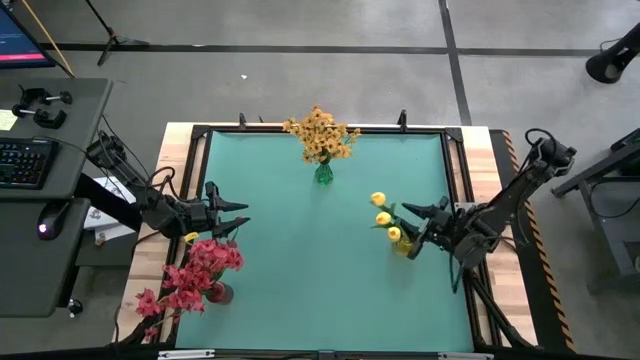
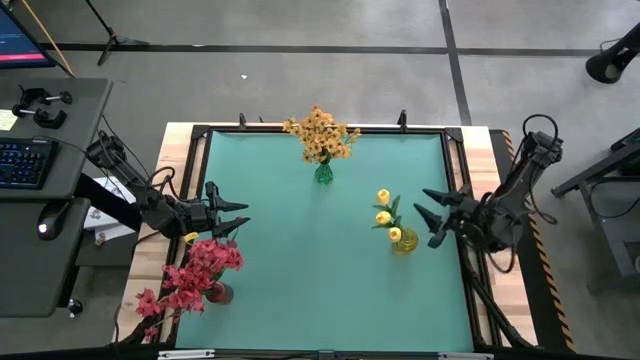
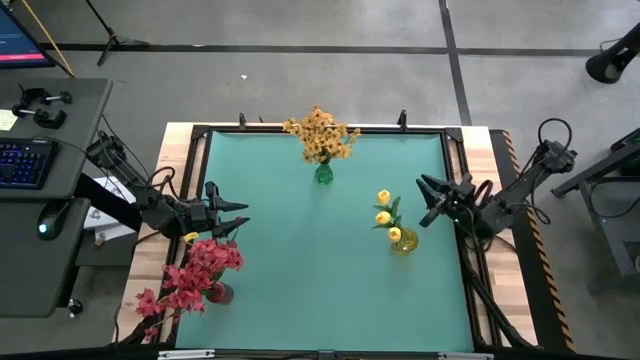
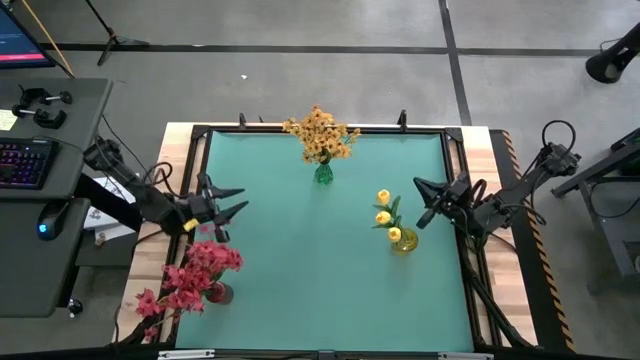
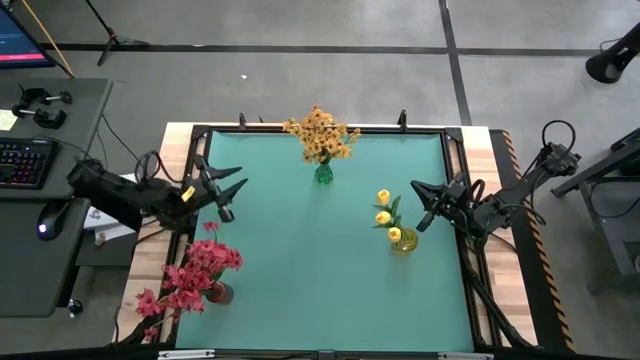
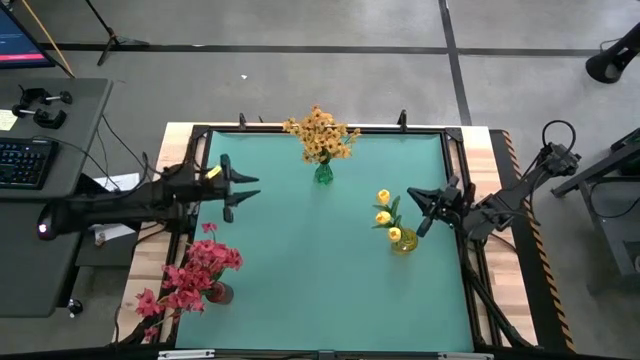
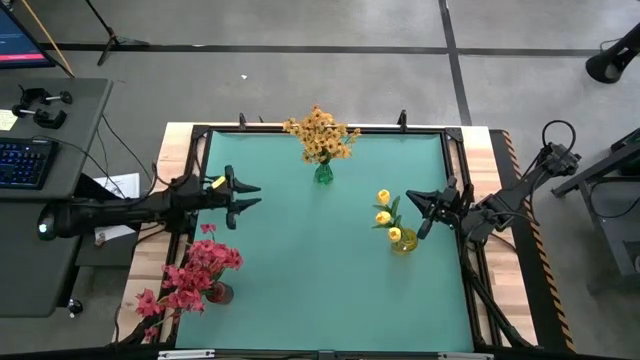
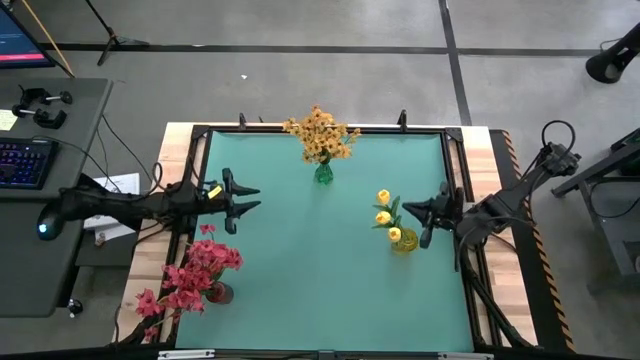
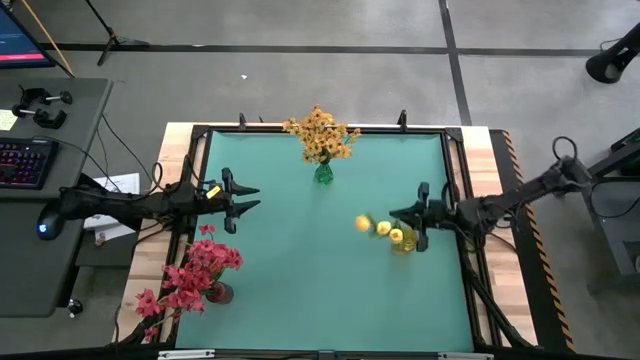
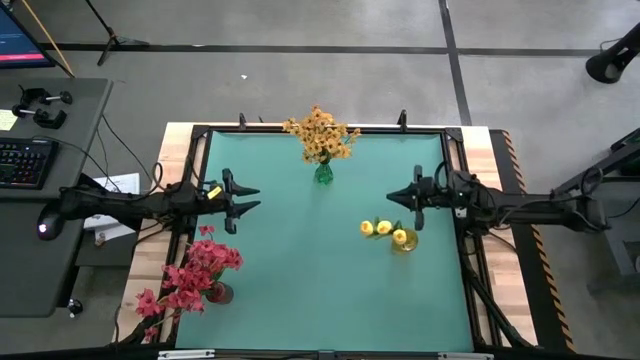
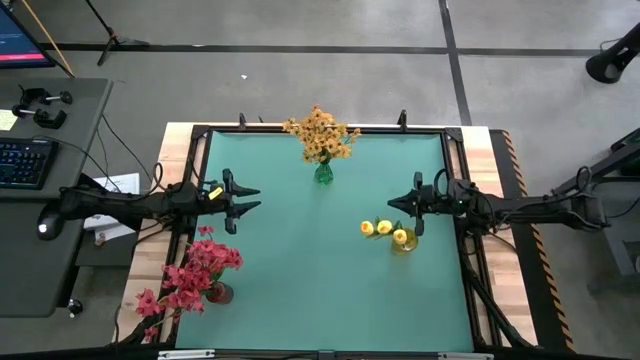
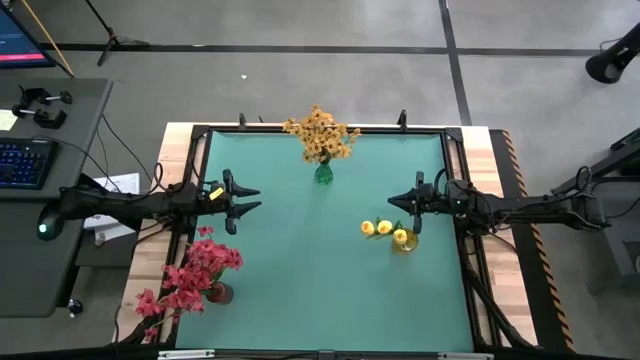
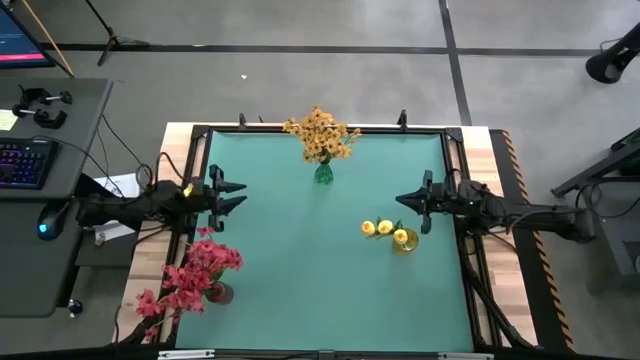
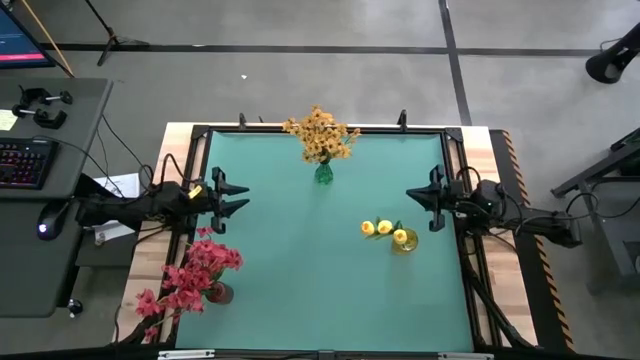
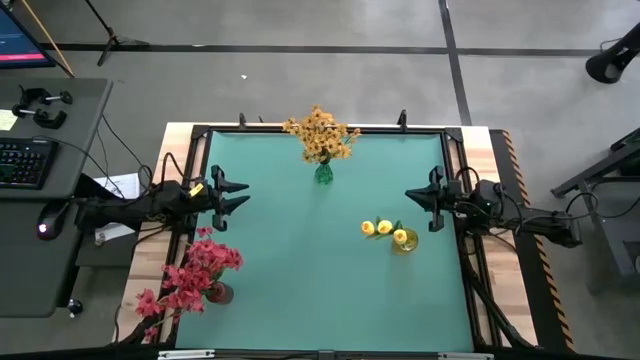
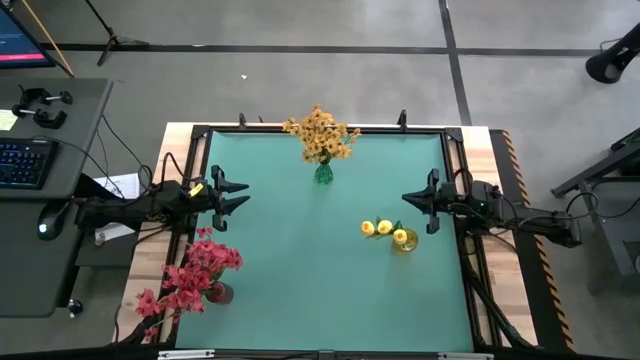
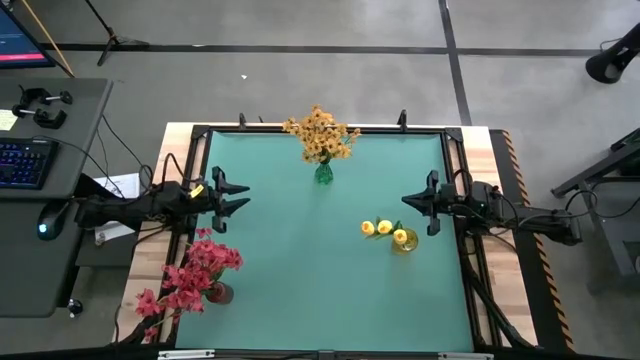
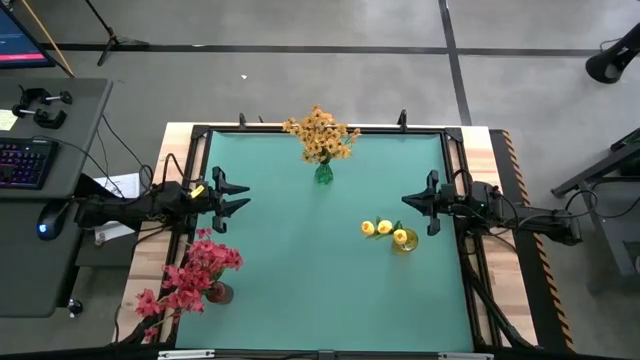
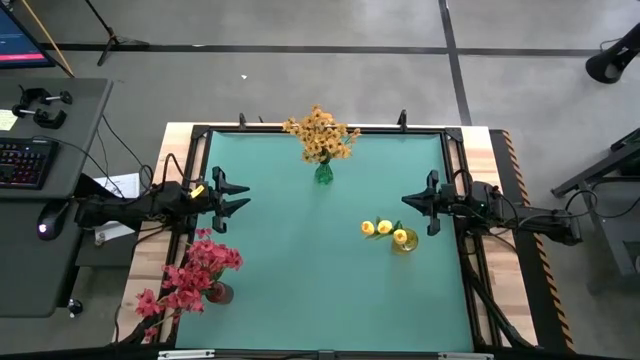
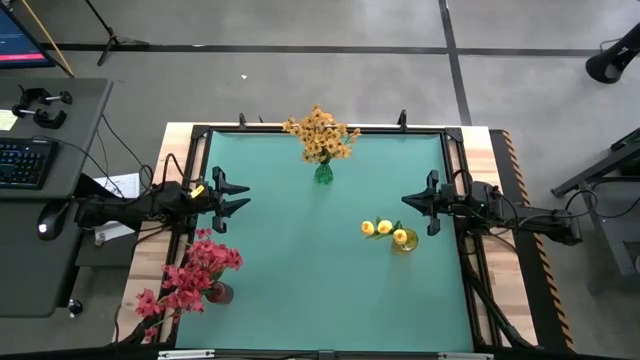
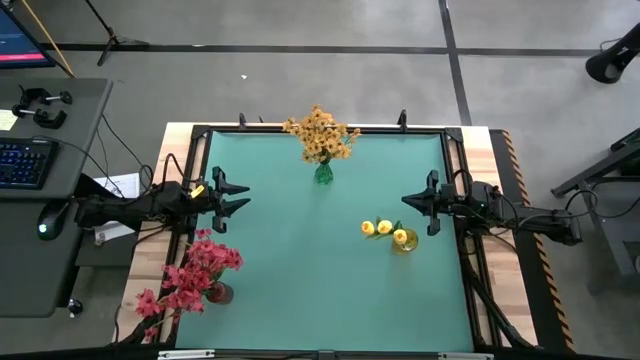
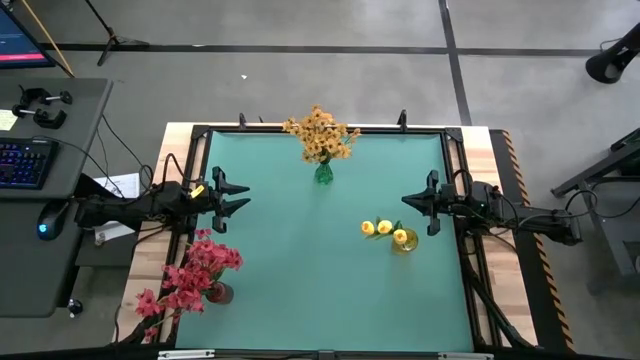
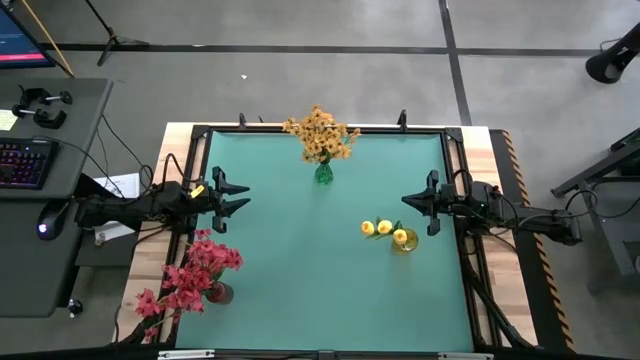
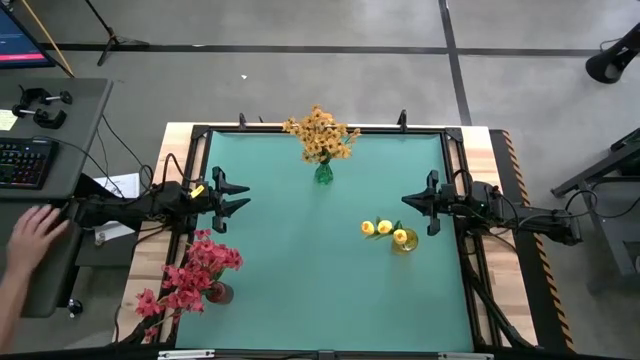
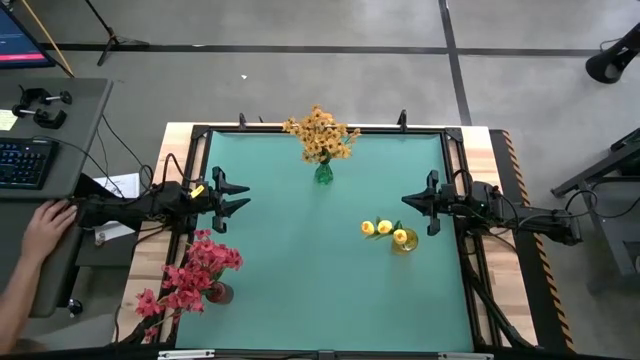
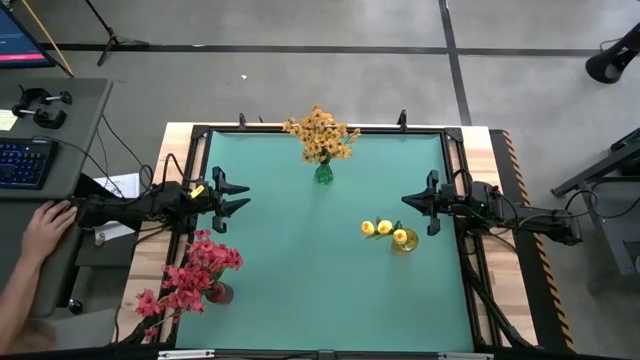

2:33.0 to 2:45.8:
Task: Sort flowers into vase by color
Return to Home Position

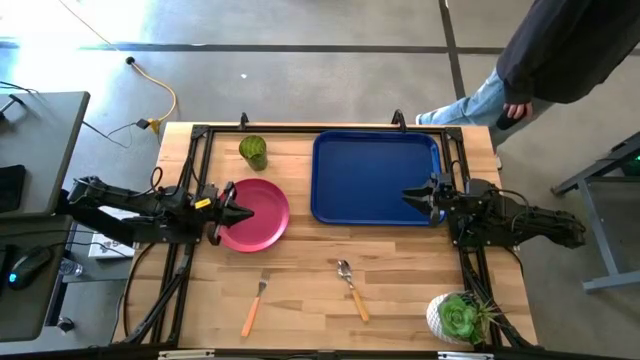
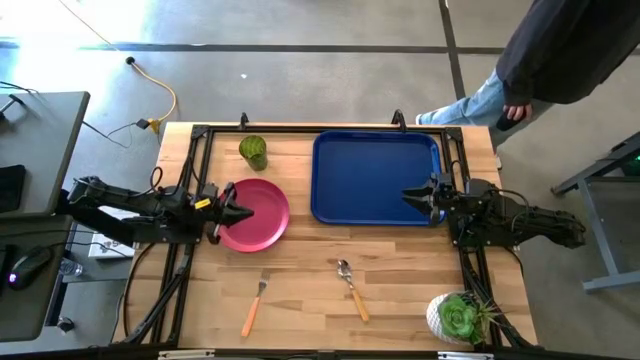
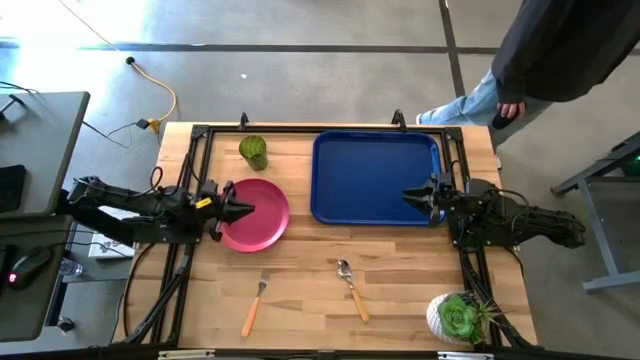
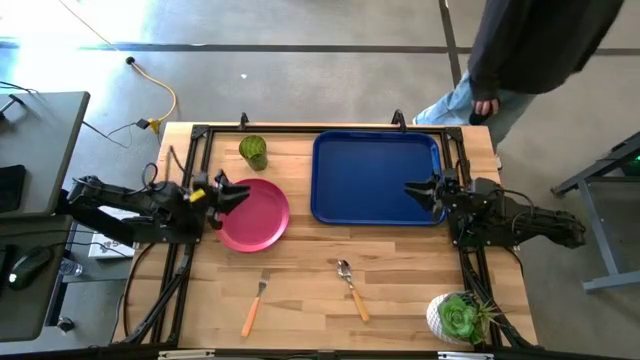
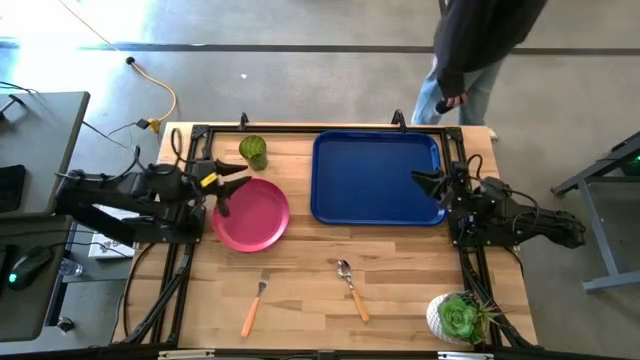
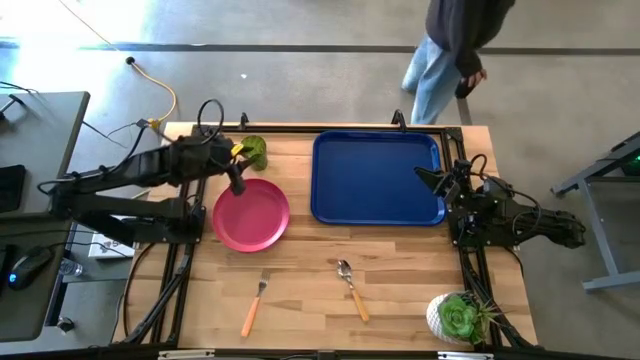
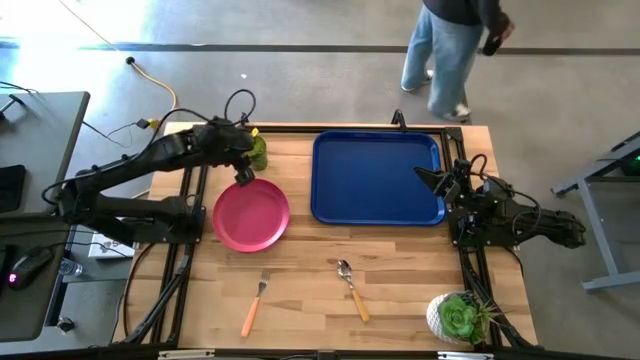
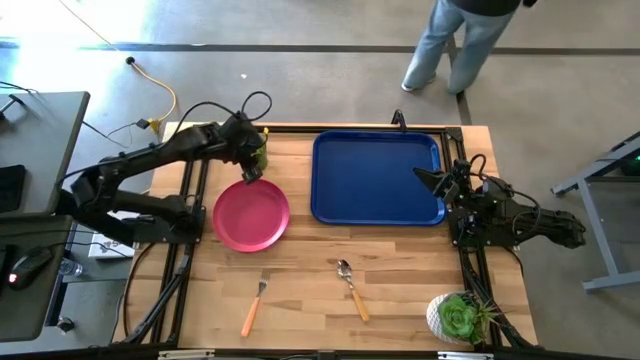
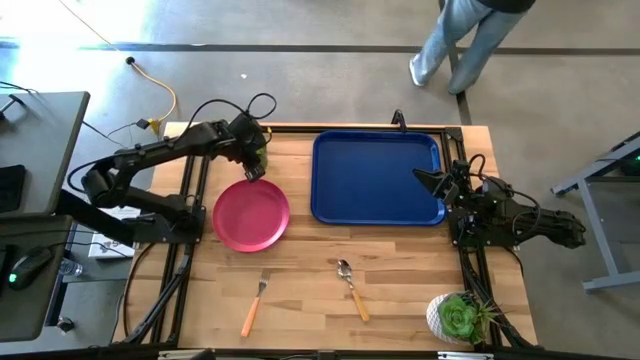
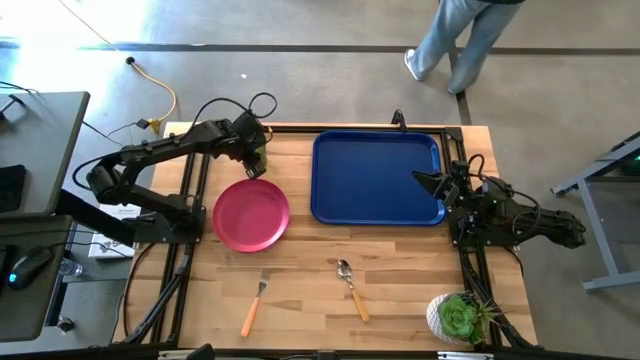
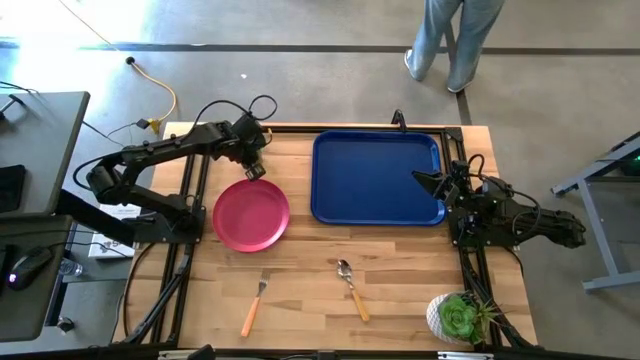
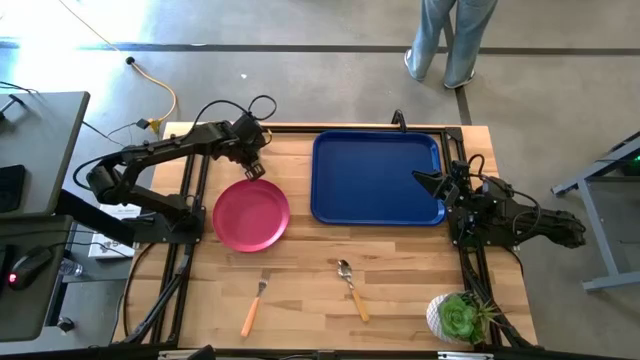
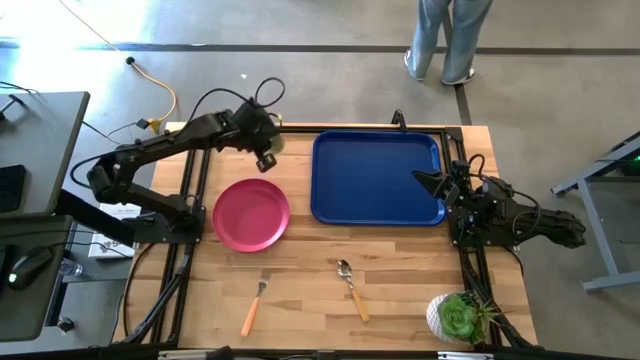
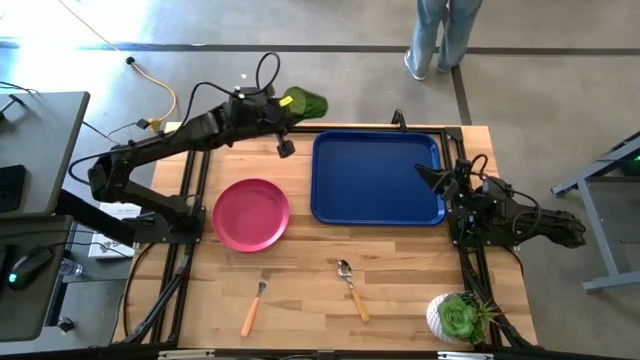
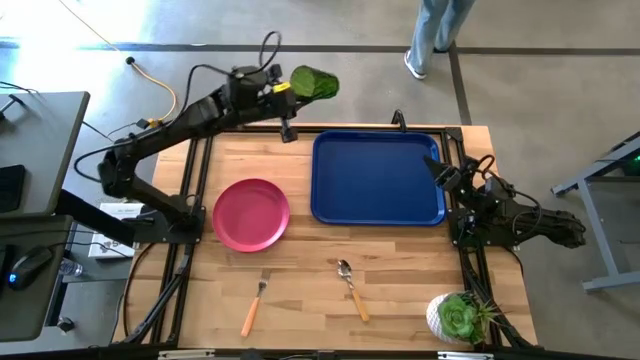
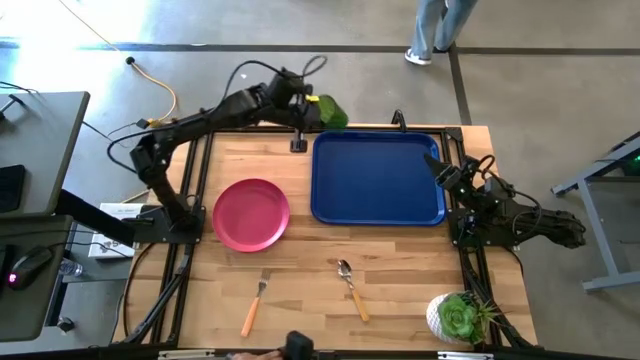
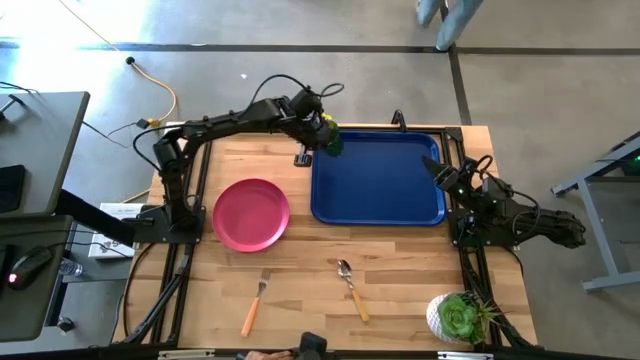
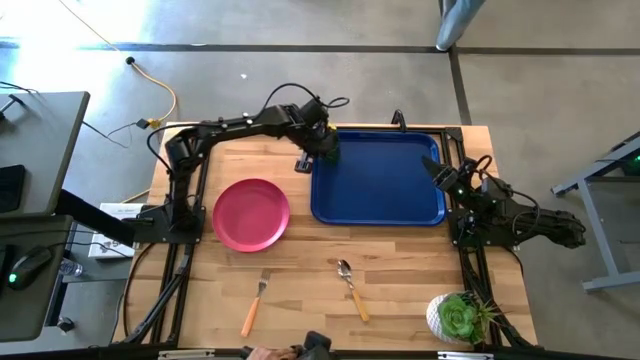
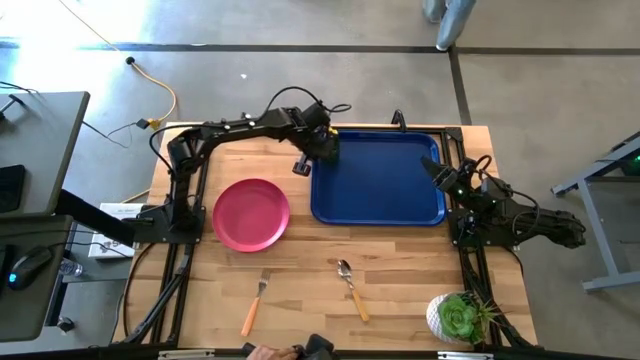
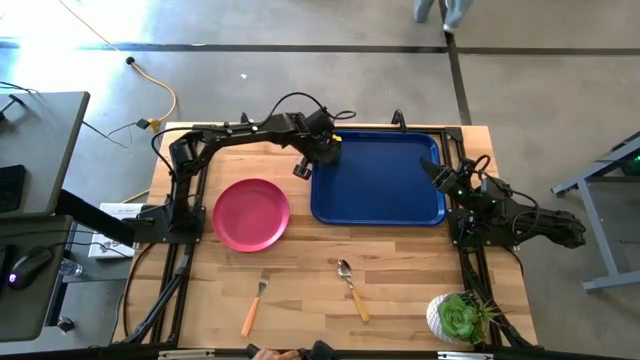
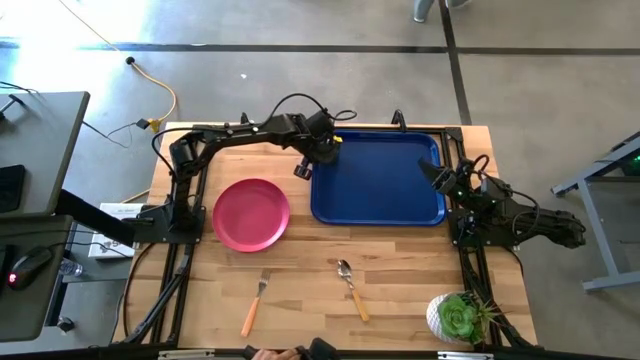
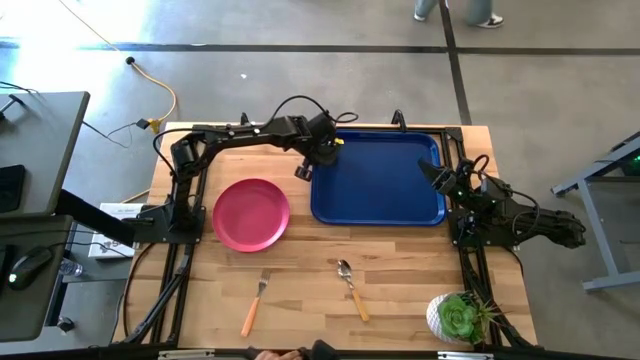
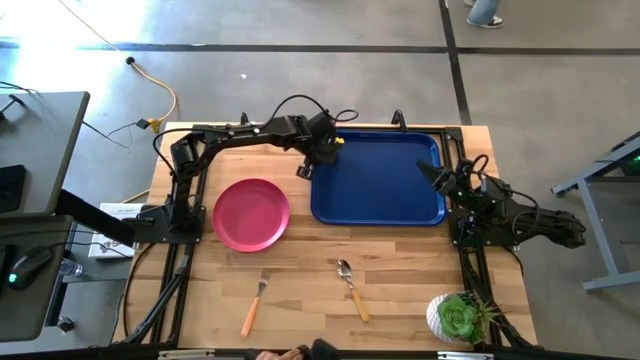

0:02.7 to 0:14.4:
Task: Pick and place plate/cup/fork/spoon on tray
Put the green cup on the blue tray
